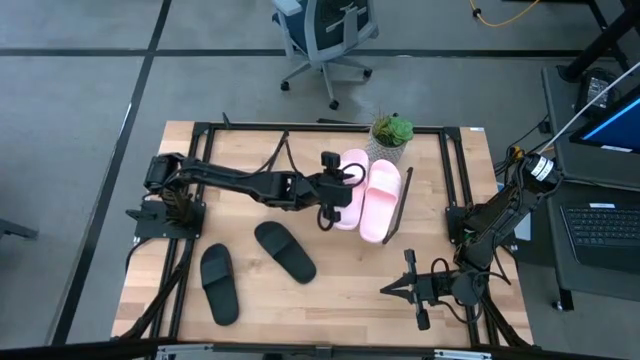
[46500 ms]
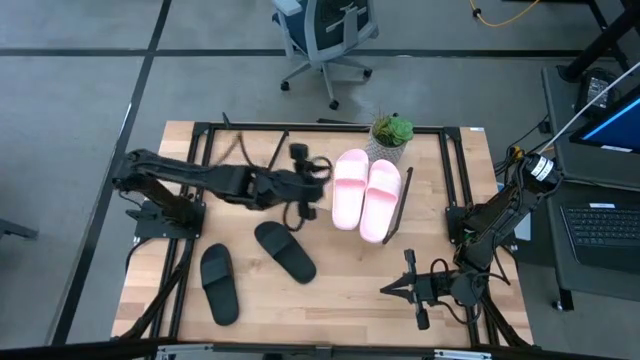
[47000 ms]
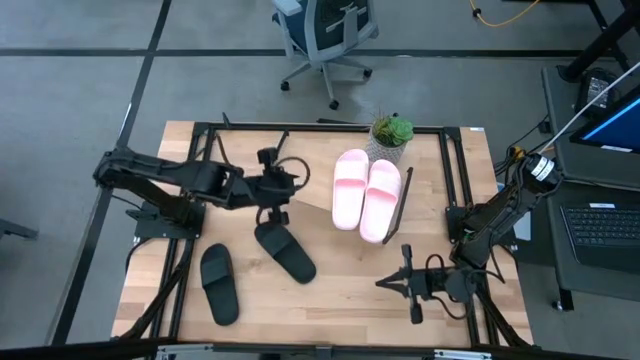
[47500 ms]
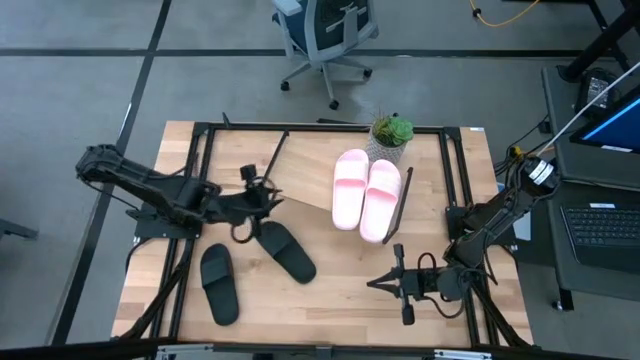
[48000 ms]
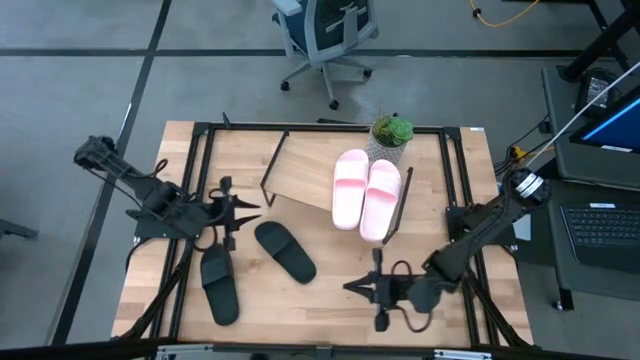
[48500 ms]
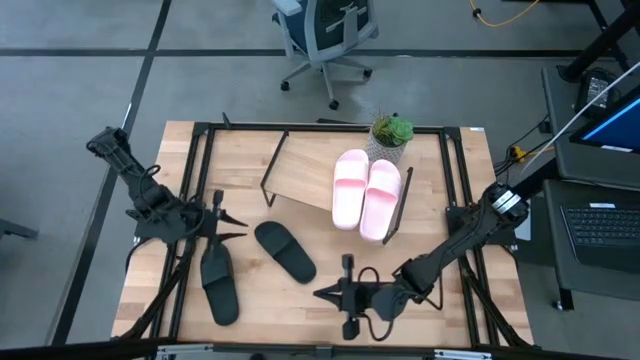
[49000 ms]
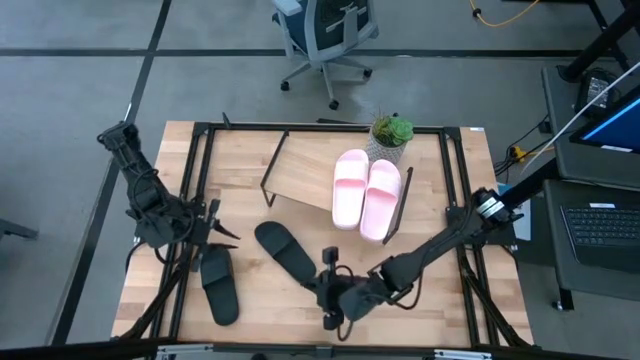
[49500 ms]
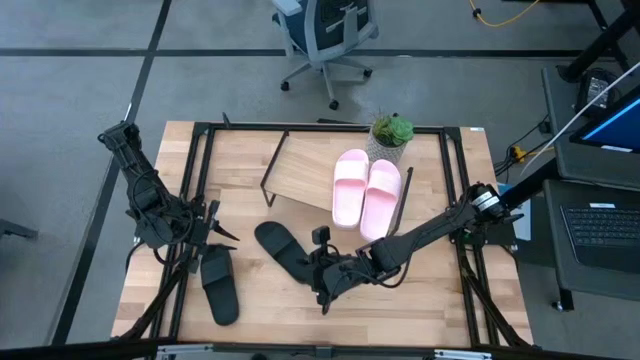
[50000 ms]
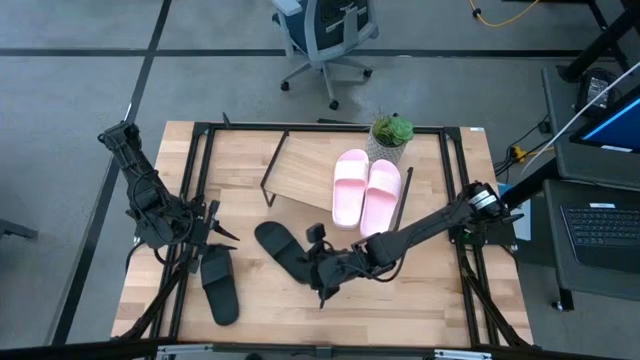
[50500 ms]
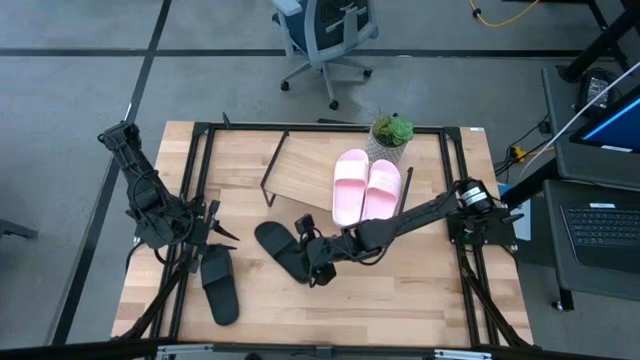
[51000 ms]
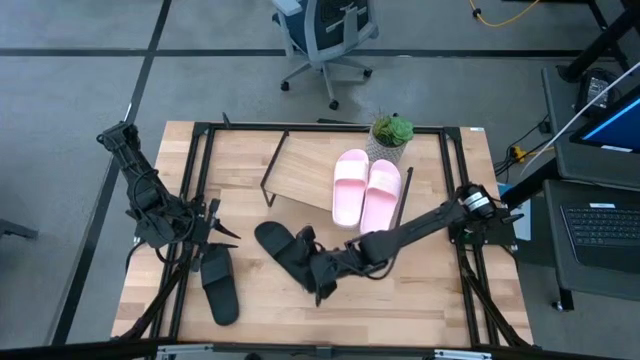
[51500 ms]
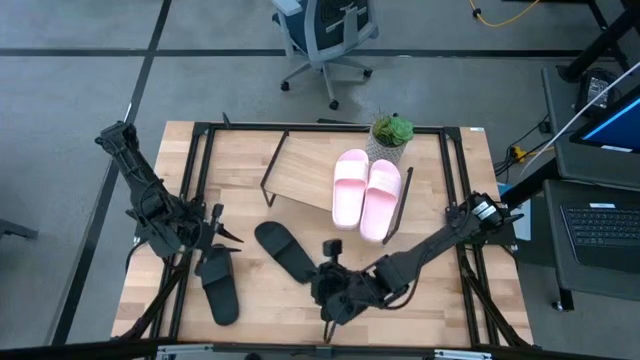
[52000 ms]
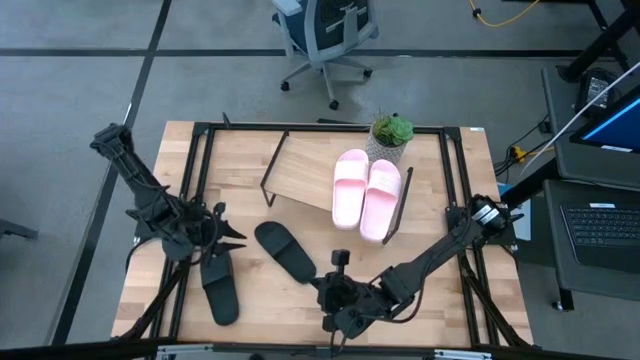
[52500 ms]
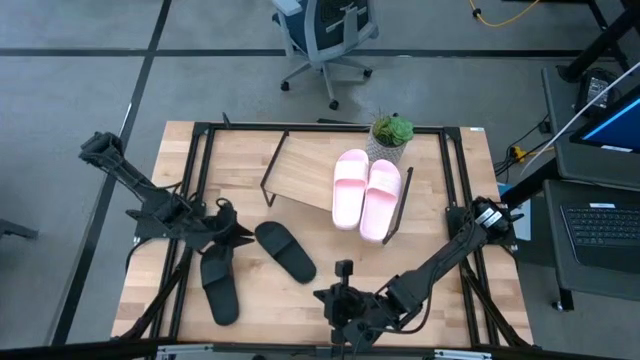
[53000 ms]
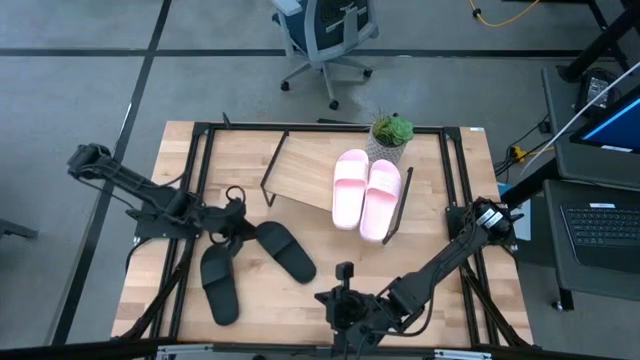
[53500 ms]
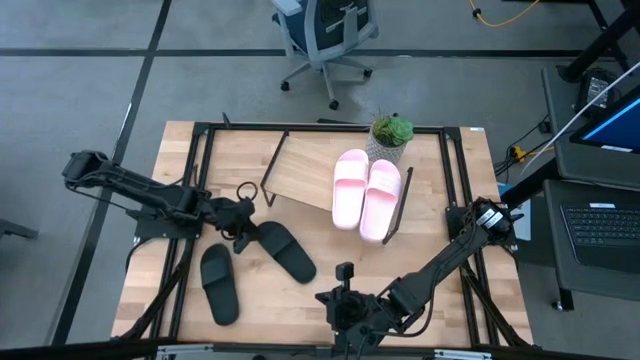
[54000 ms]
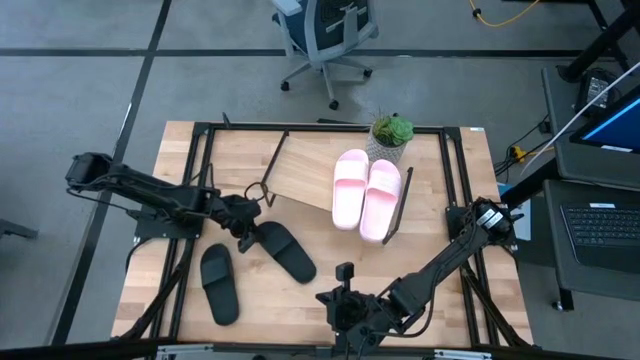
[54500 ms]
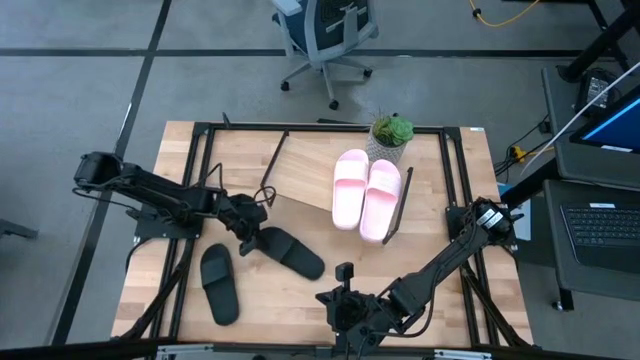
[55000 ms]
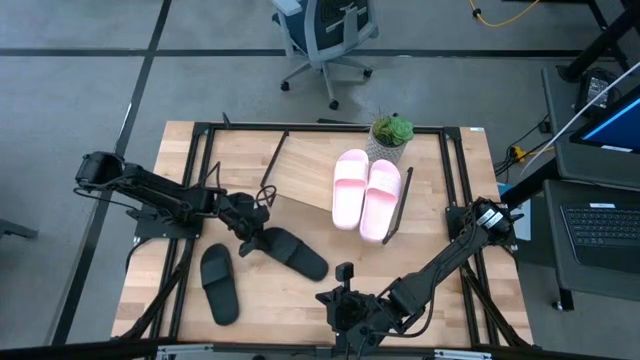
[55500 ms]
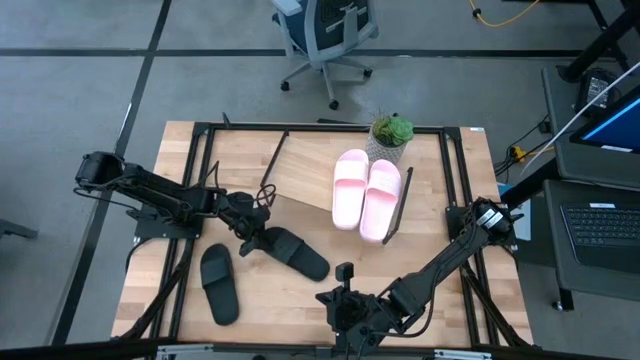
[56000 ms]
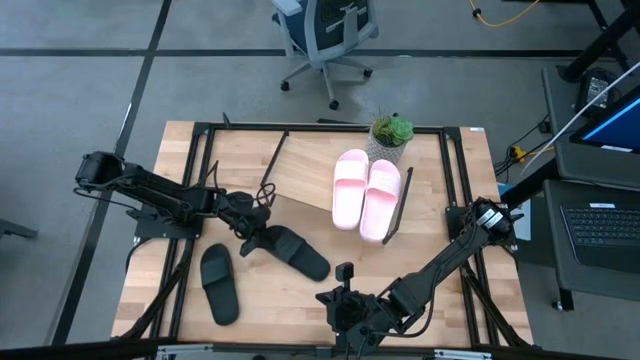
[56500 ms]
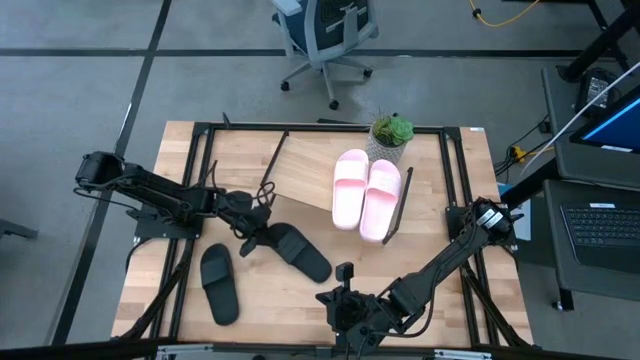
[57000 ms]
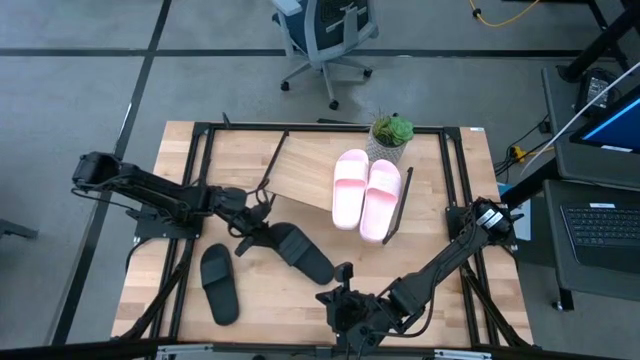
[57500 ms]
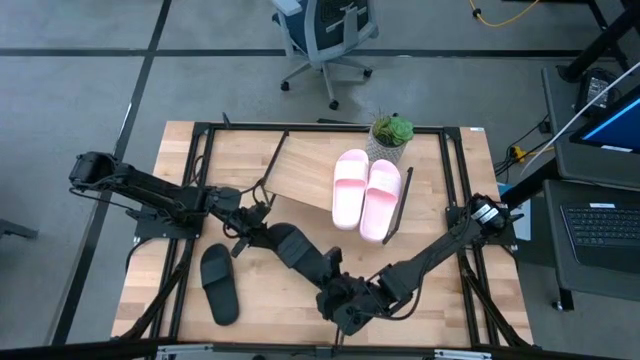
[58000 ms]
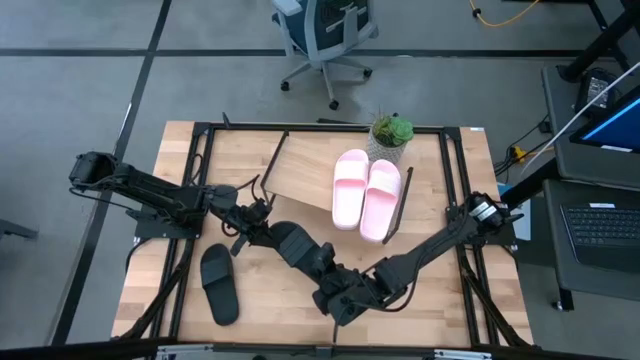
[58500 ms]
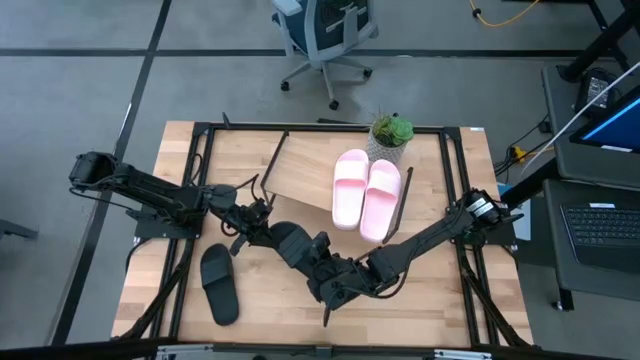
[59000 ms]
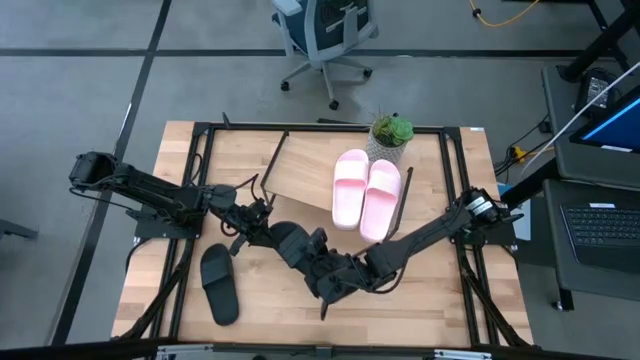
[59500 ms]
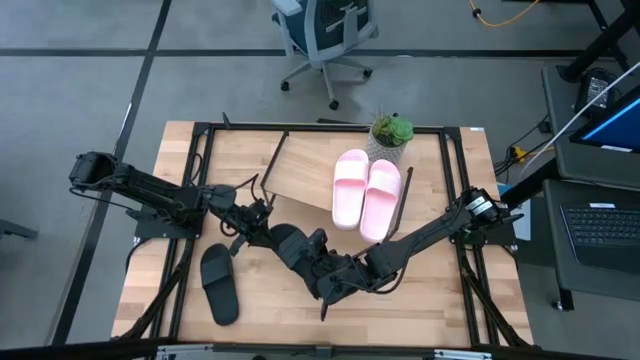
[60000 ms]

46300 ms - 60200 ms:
Task: Pick and place slides into the shelf
Put the right black slide on the shelf

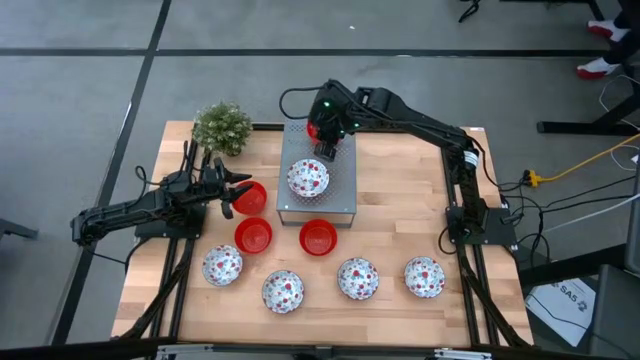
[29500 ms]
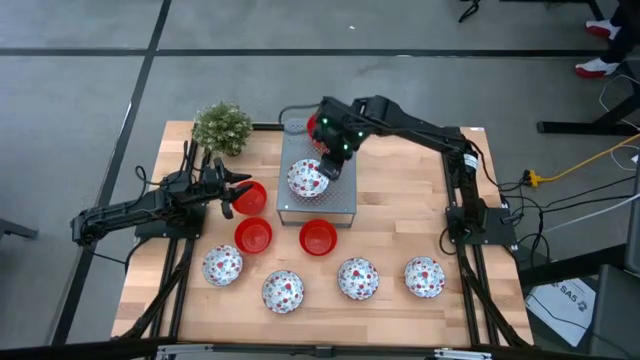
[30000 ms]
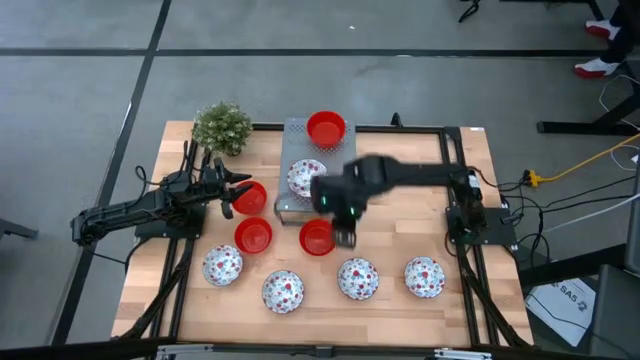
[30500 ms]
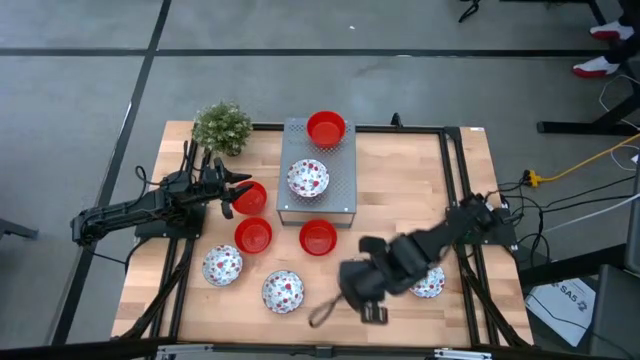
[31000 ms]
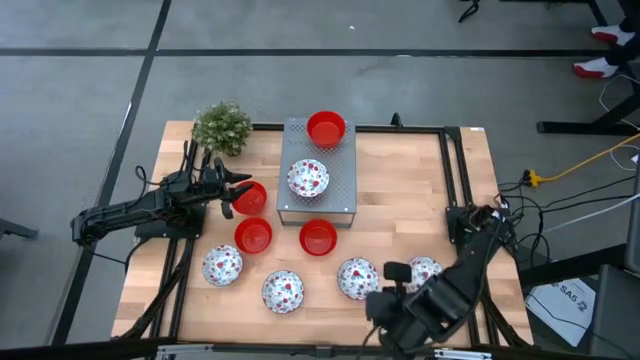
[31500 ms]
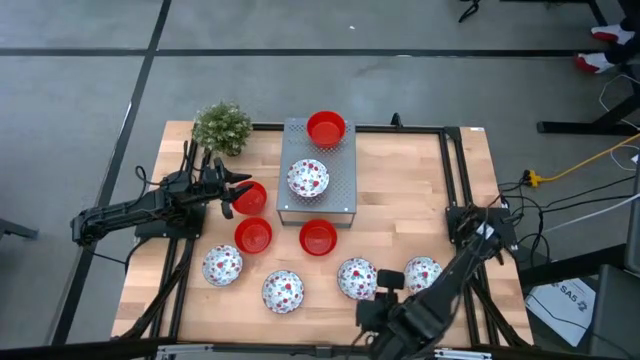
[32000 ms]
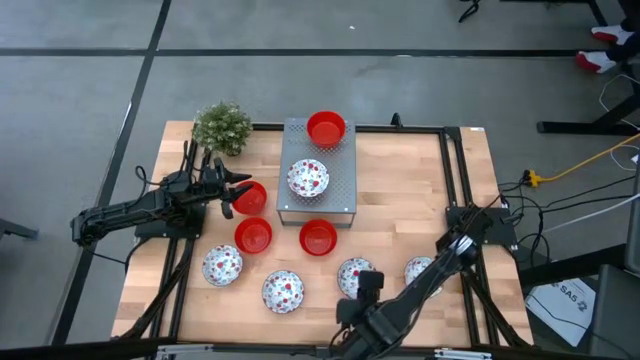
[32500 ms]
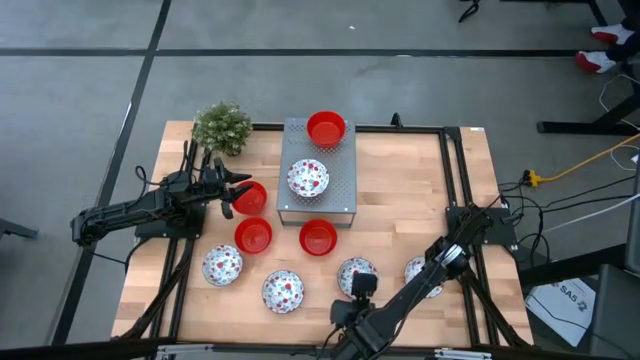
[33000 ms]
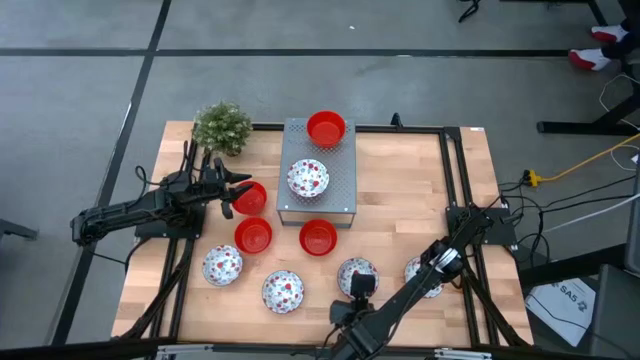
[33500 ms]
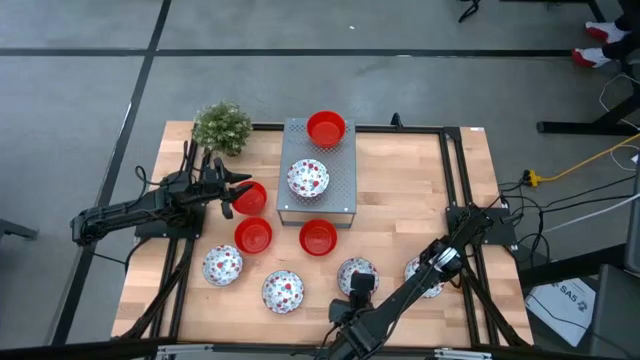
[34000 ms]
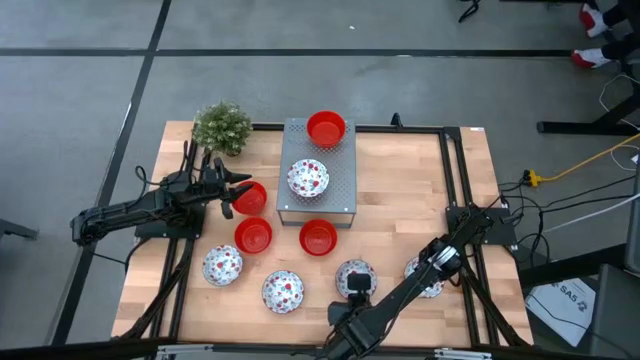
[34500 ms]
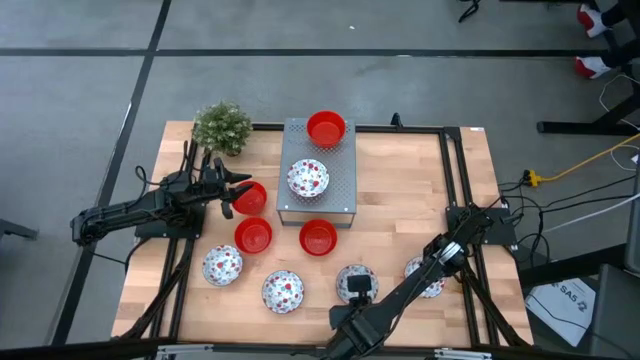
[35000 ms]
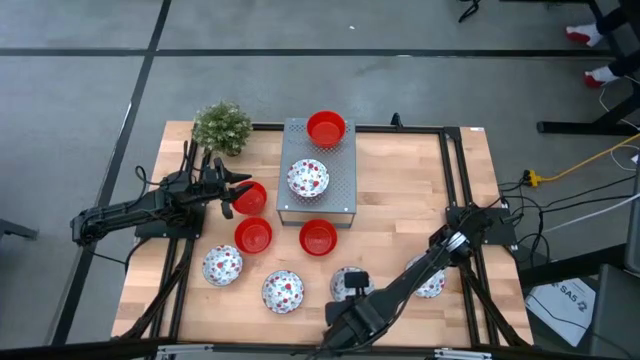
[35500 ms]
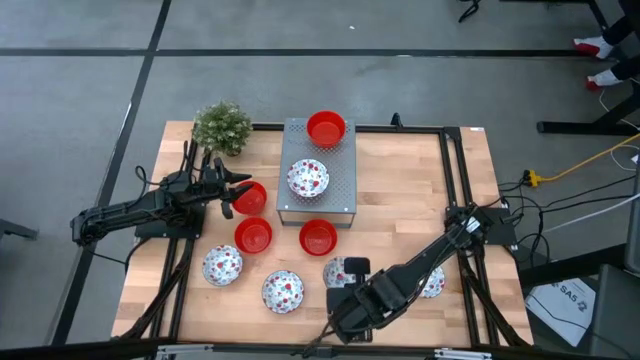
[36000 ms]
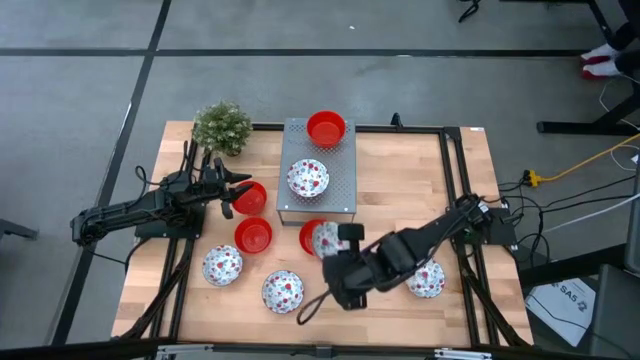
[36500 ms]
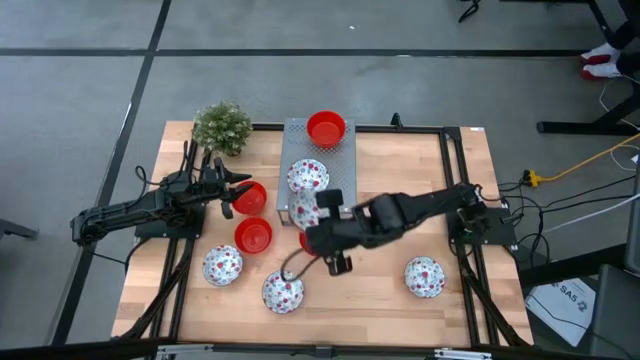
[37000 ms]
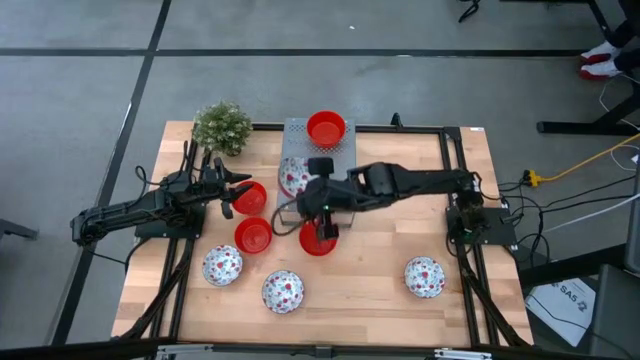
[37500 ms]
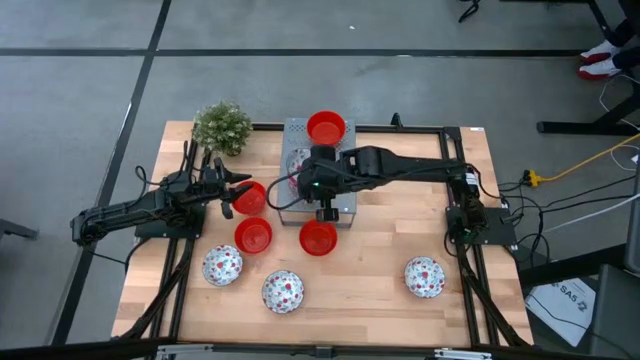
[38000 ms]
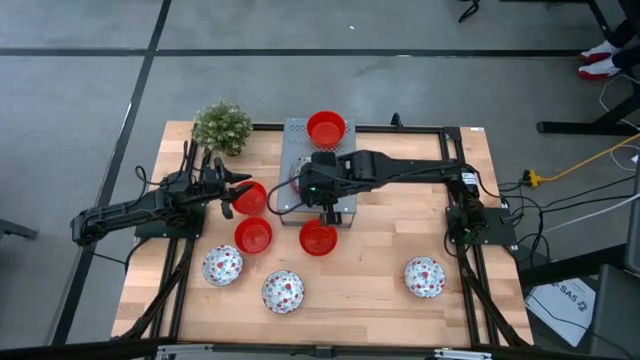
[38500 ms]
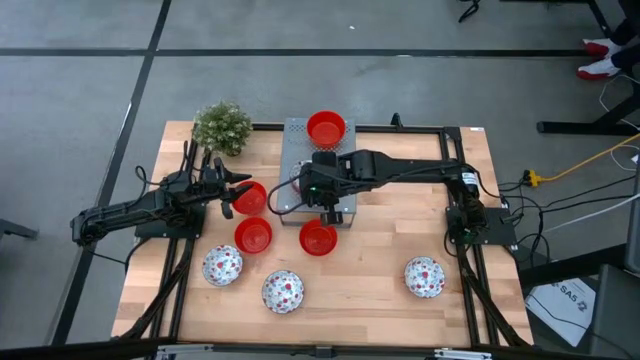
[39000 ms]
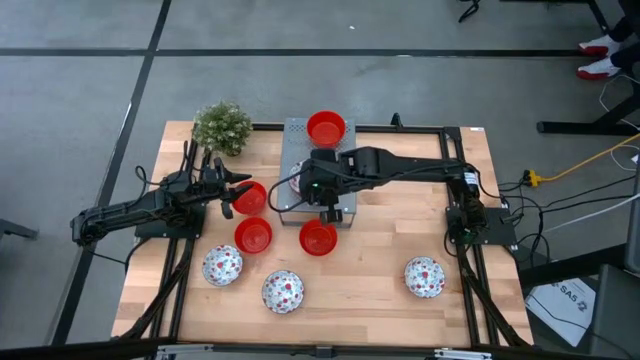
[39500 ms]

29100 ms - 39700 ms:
Task: Pick & Place Mini bowls
Stack the white patterned bowl on the white patterned bowl on the shelf
